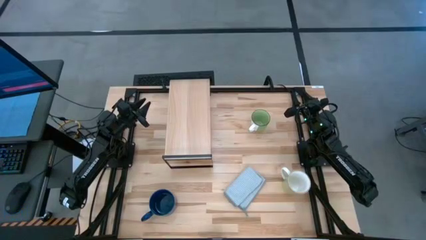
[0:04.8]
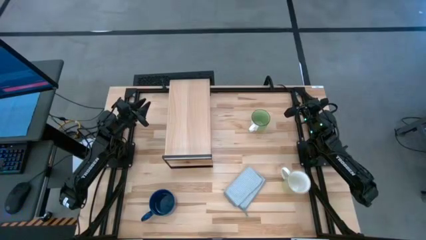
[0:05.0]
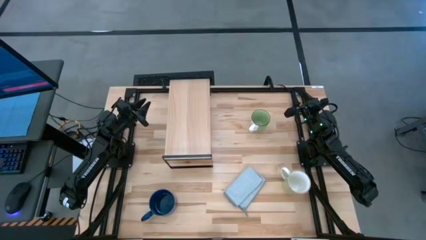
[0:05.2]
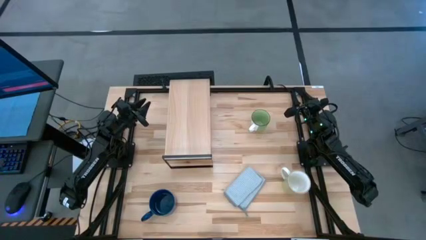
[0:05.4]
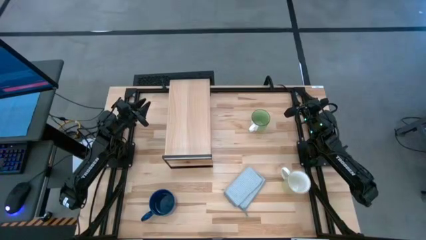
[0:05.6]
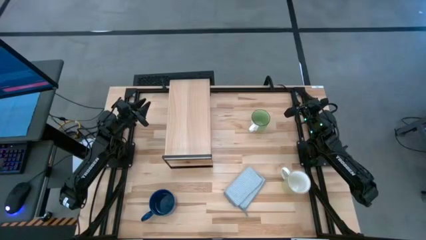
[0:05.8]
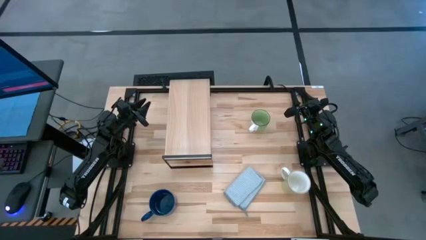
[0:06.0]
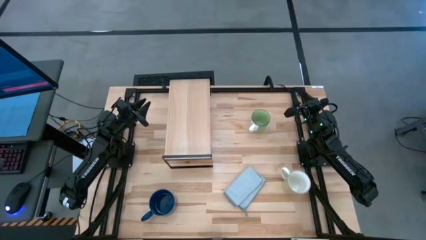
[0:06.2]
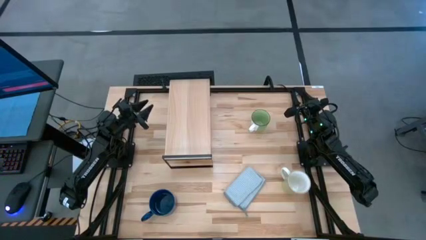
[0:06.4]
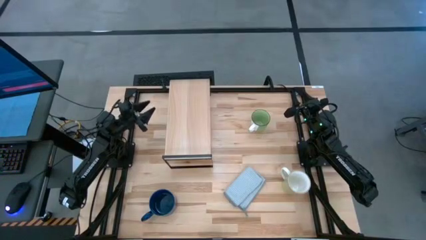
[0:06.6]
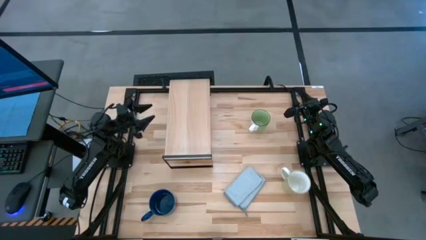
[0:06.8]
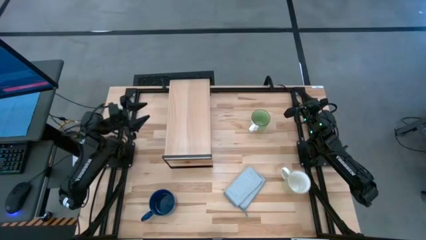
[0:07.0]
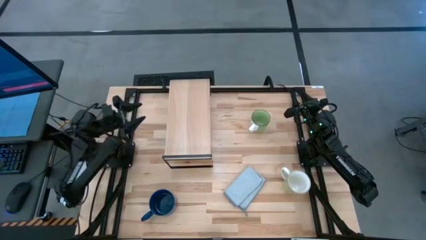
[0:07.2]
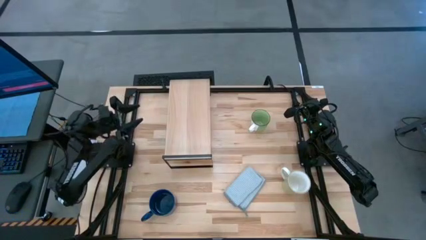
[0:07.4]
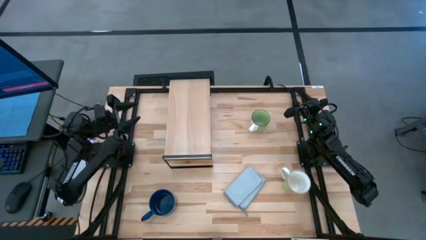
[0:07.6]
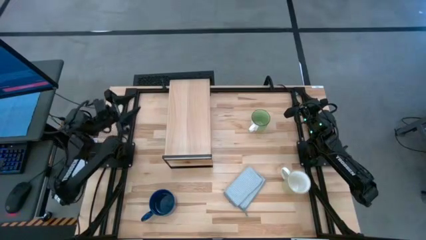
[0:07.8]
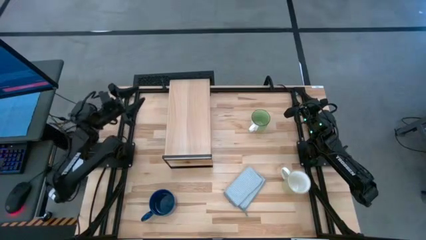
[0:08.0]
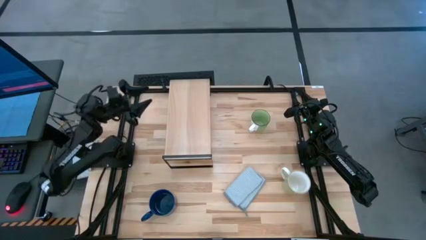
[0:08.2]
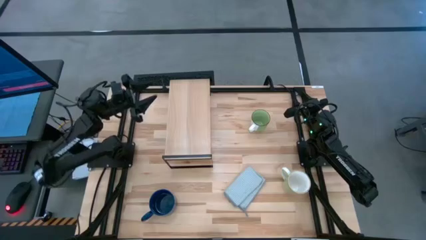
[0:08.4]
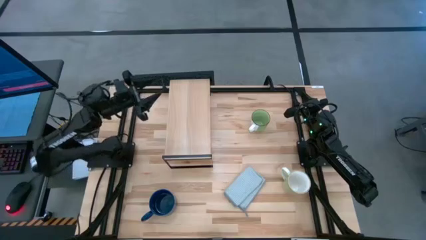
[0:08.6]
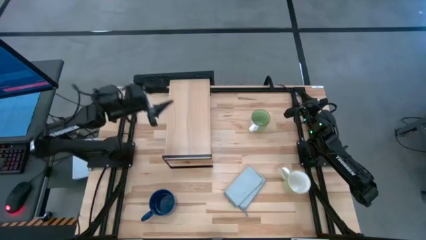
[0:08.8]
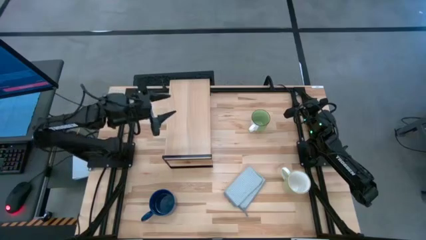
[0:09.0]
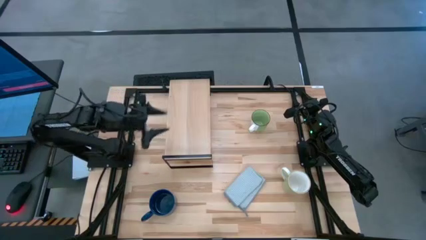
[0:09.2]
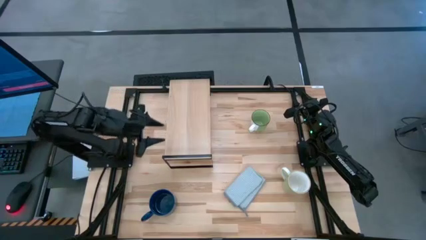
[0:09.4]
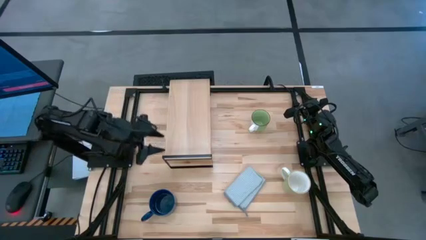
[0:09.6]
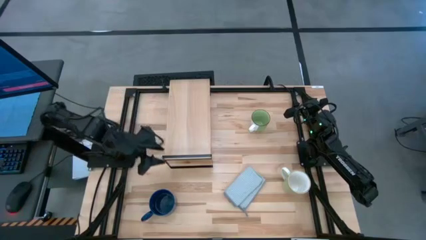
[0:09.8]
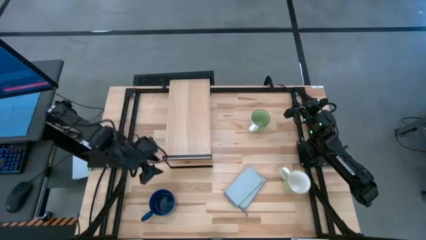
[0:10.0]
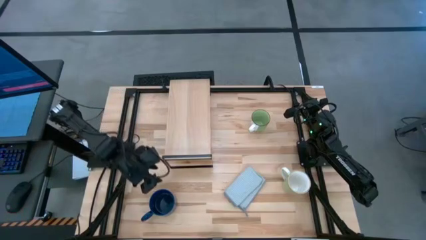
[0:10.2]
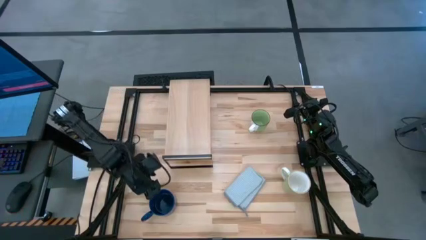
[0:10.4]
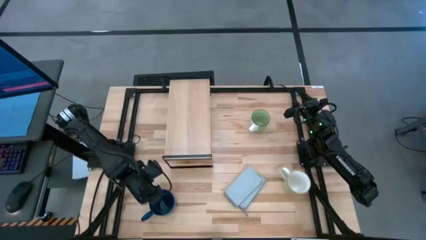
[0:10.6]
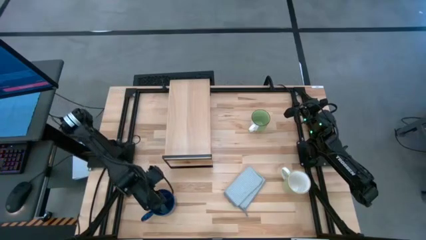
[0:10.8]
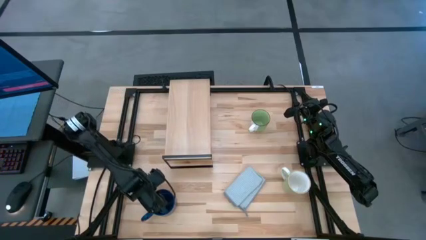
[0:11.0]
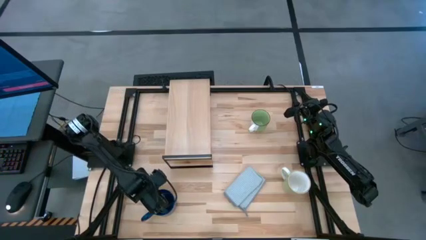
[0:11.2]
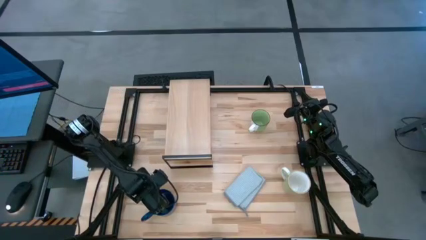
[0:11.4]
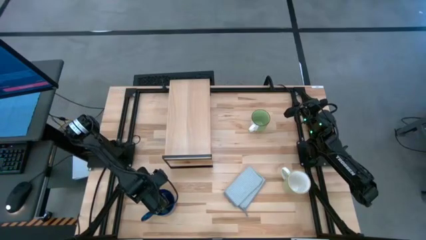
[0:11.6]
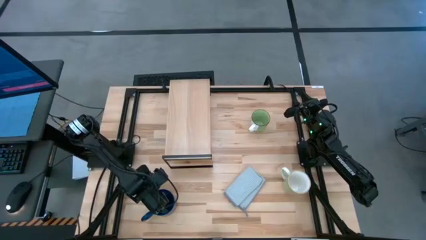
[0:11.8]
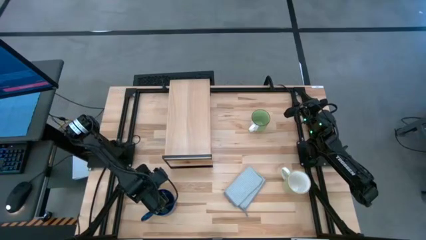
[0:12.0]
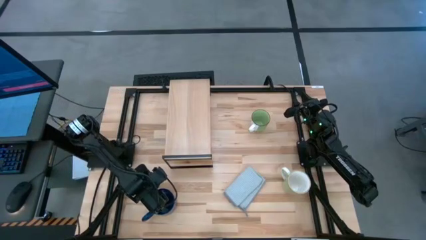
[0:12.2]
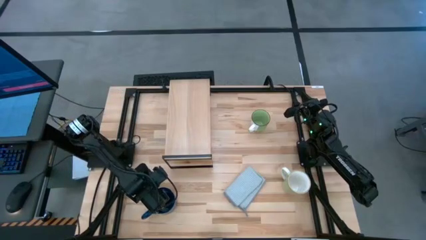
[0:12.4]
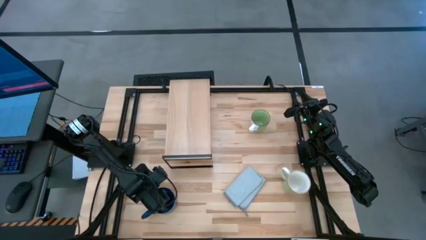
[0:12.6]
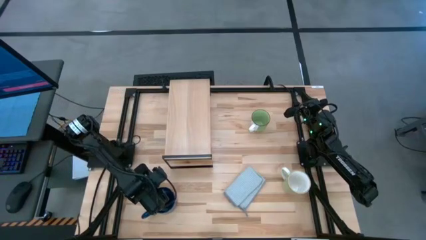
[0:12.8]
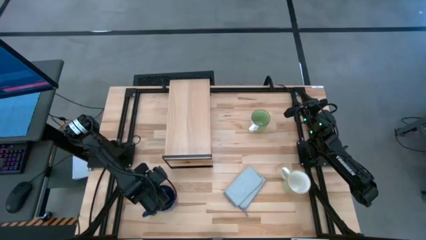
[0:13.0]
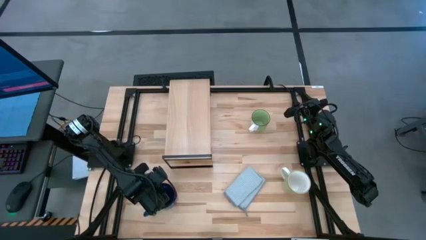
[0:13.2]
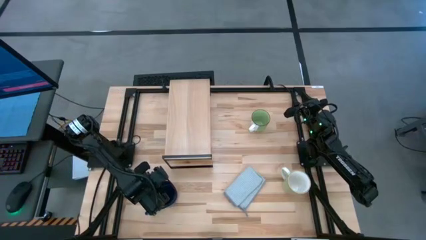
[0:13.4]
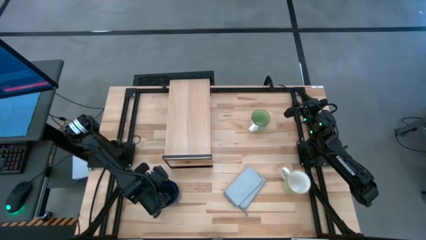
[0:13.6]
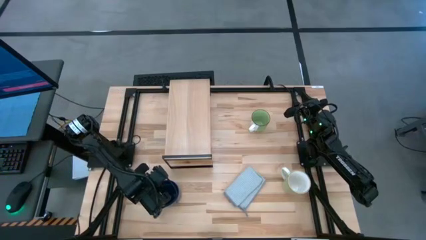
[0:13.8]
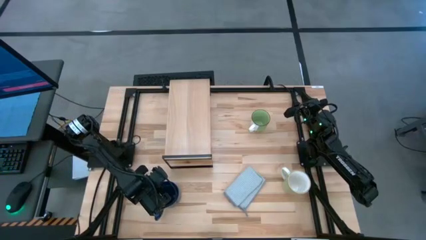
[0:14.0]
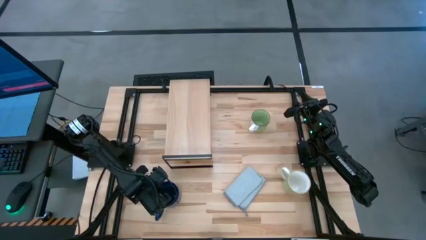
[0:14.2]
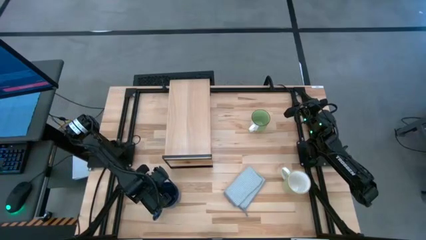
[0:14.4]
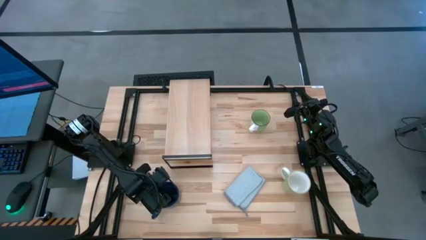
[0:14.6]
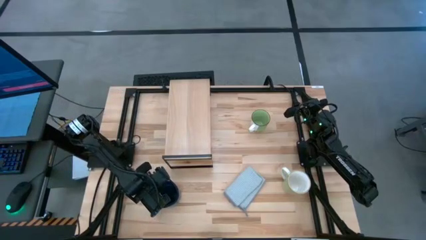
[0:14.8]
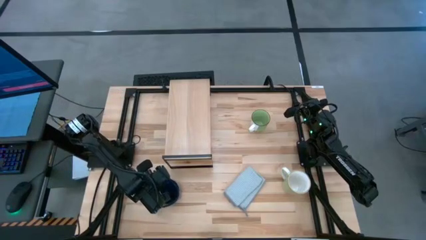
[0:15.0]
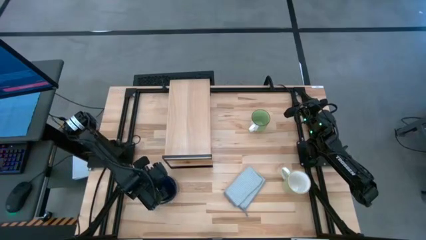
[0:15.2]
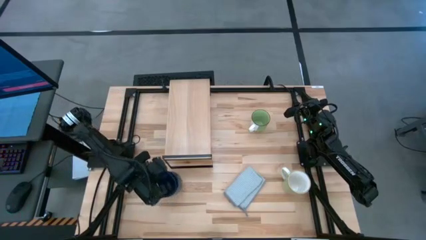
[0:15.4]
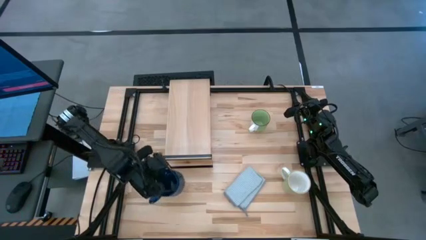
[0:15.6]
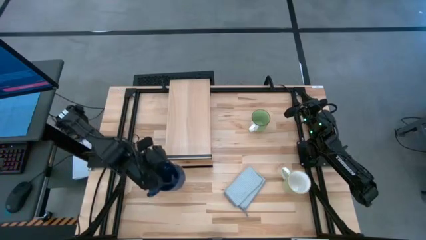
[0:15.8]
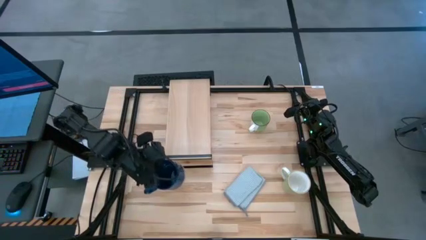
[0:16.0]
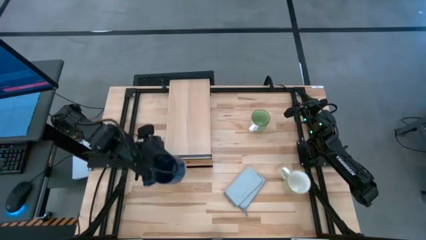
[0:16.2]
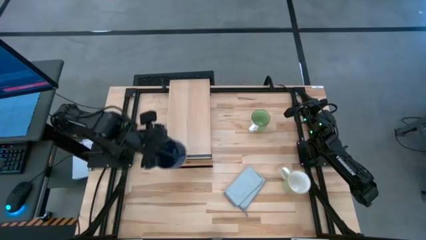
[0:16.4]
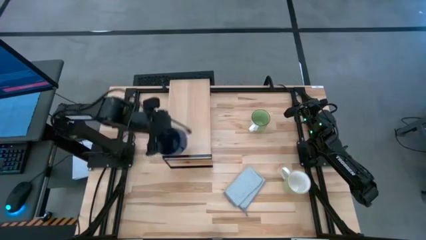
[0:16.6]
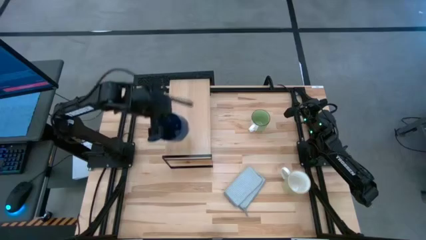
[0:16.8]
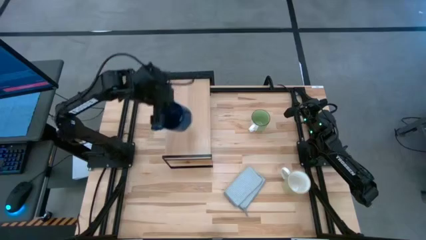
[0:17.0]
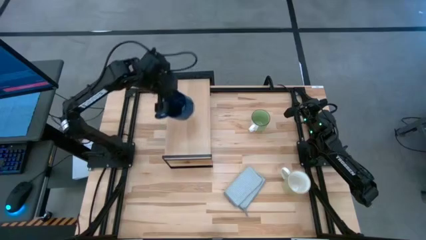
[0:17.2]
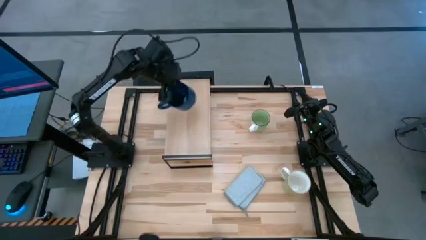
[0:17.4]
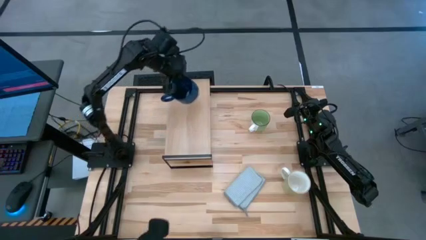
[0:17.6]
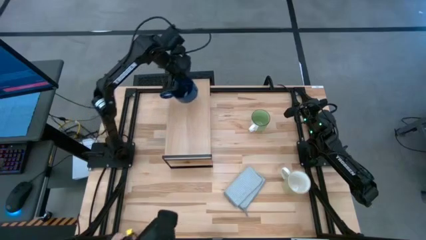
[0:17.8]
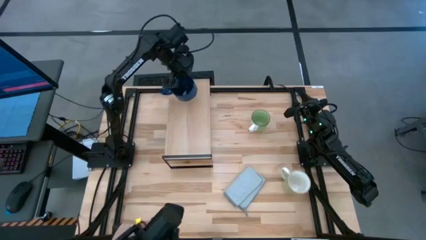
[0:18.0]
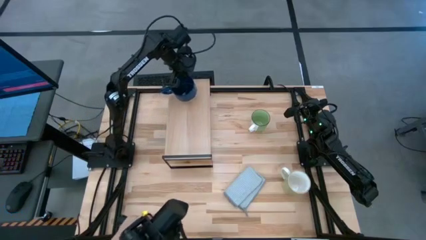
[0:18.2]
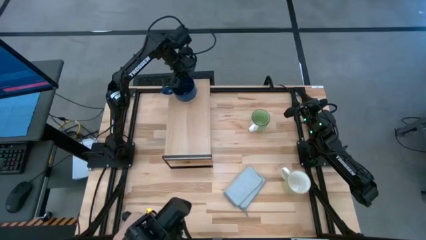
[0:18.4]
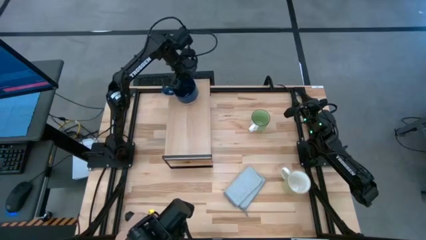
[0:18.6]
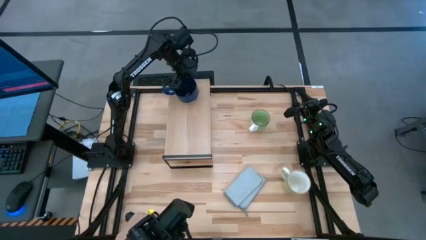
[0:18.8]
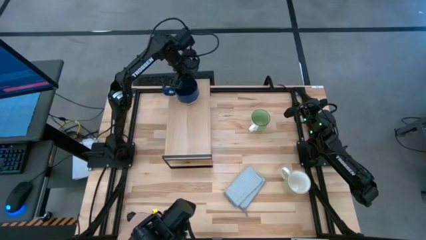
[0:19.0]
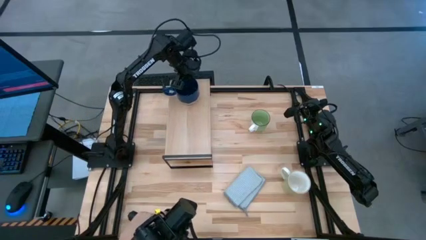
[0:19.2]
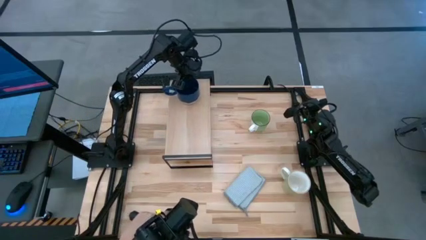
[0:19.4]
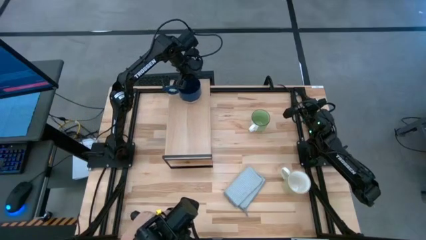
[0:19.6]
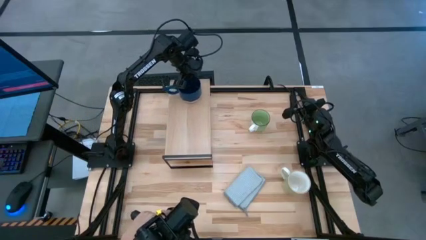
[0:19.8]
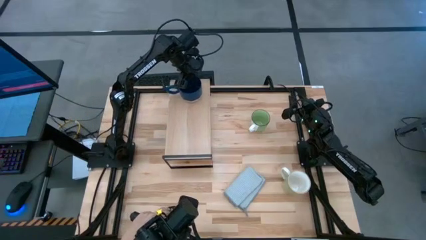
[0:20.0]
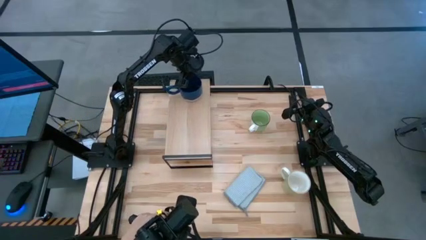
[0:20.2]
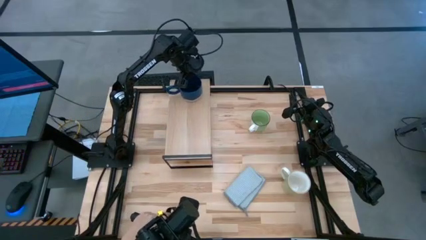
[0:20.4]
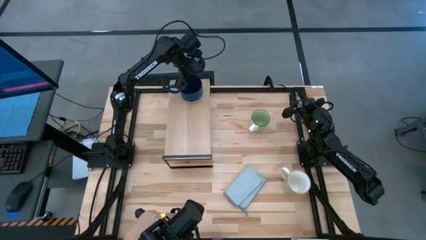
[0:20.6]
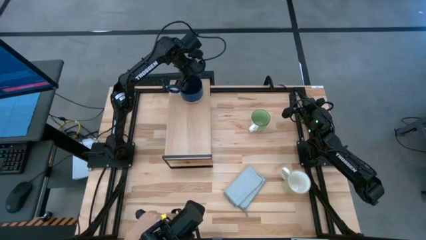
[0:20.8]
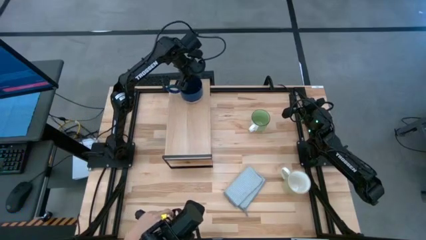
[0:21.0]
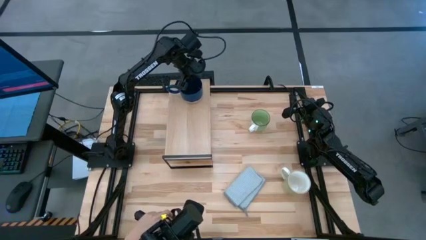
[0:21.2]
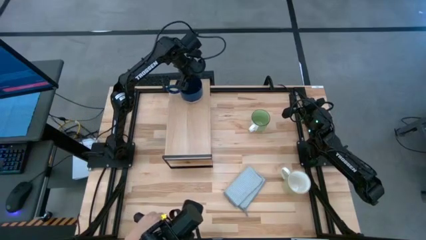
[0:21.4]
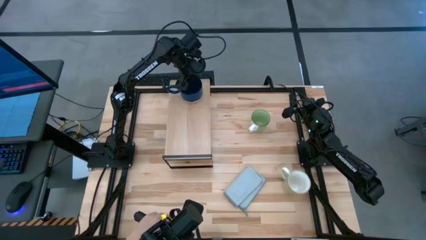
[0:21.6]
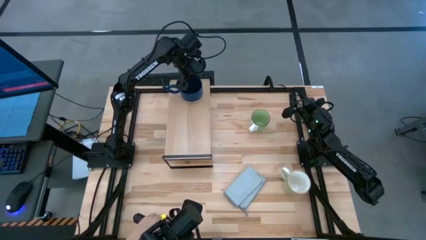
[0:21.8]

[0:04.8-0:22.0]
Task: Stack small to large cups/mugs on shelf
Put the blue mug on the shelf
